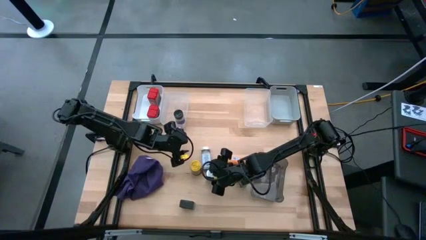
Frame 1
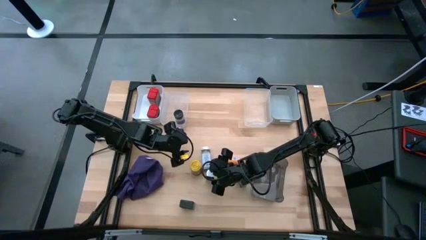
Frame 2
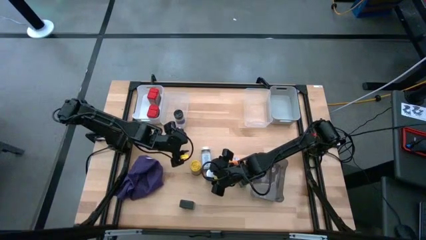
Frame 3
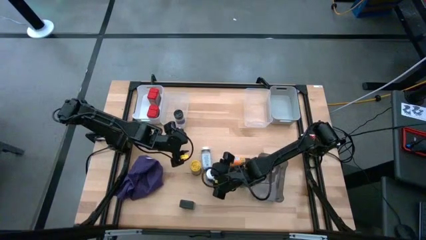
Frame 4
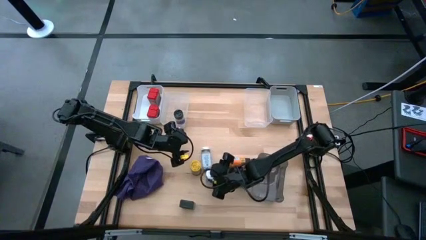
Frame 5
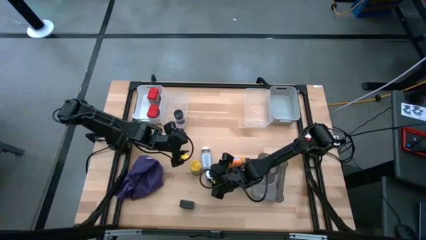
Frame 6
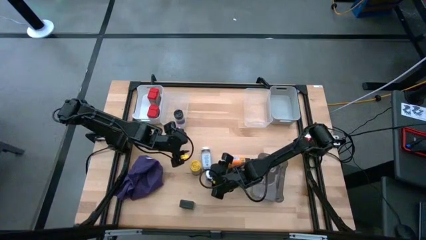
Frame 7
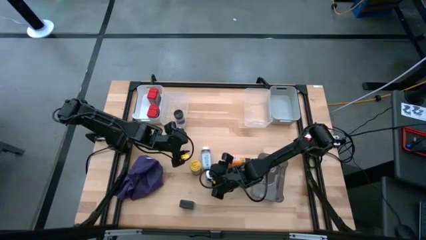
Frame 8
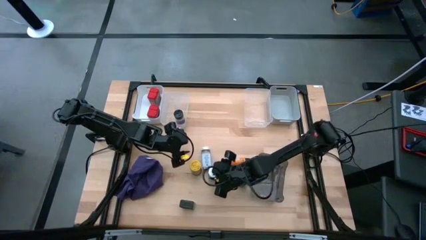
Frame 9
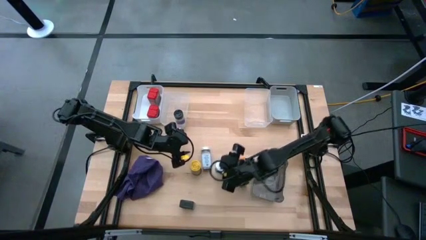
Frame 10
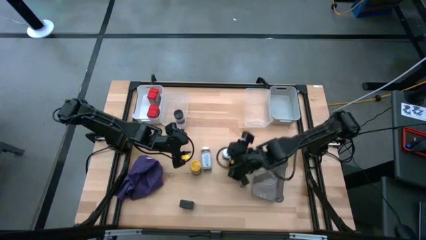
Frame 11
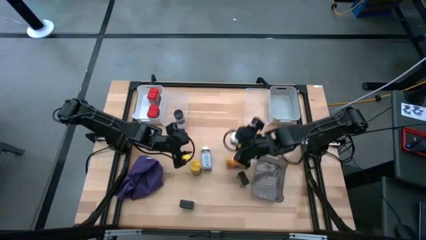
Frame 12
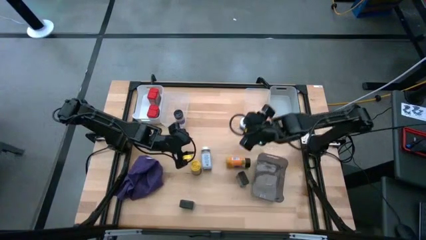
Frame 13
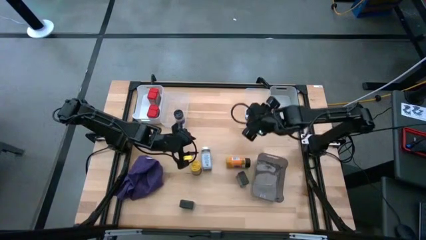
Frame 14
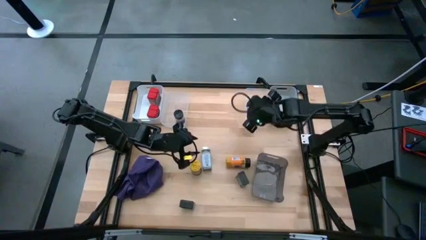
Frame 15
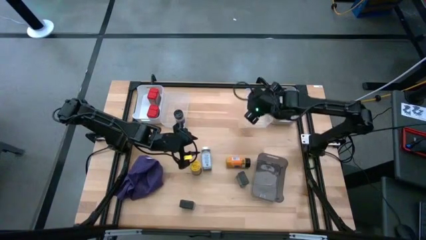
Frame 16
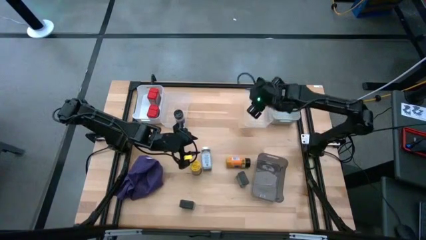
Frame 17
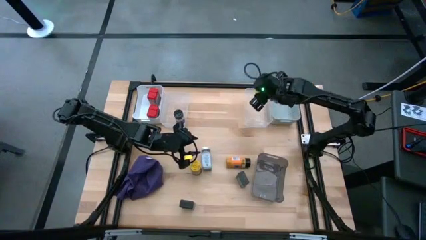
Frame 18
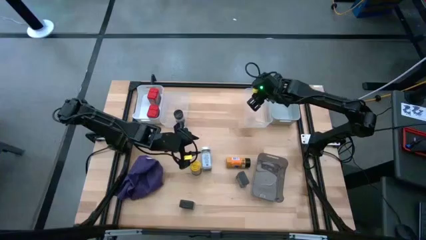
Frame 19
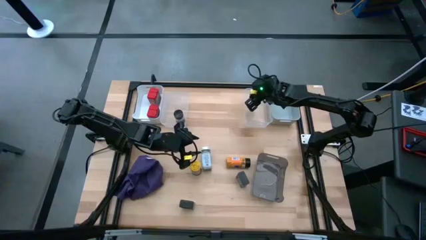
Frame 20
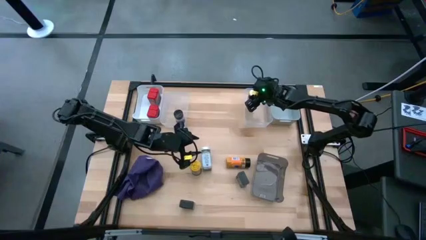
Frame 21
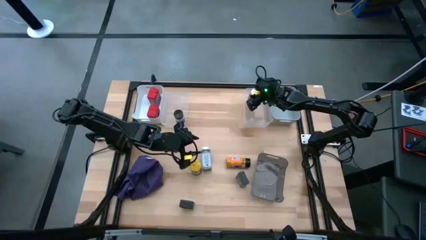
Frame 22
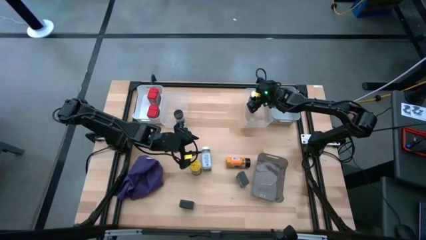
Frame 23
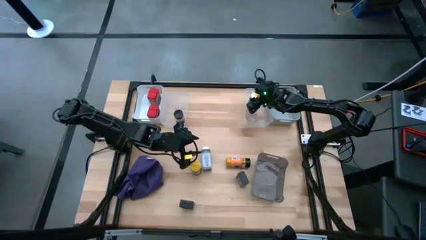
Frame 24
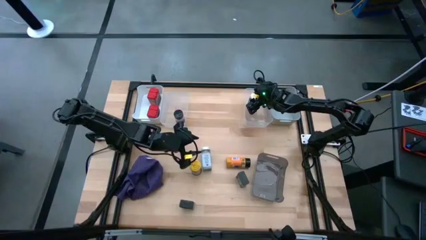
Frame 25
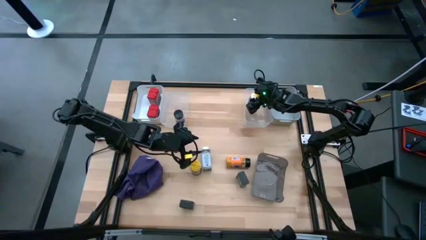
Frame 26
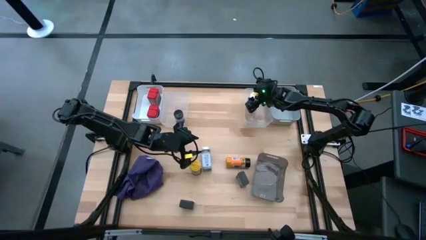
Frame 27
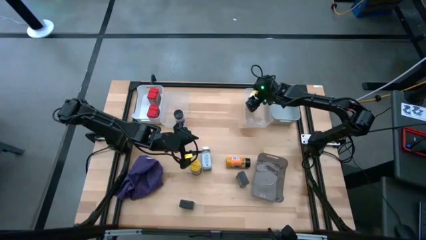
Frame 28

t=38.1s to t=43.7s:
Task: Sort spices by type
Put the bottom white seasoning bottle into the right transparent bin

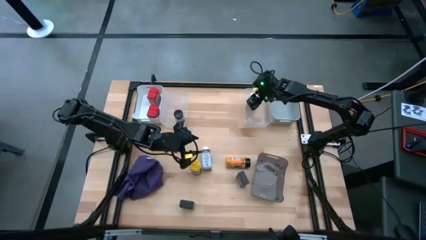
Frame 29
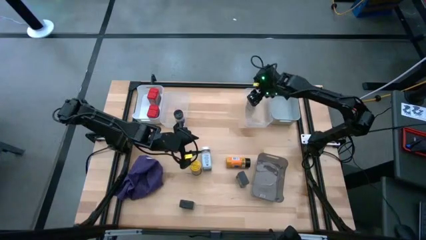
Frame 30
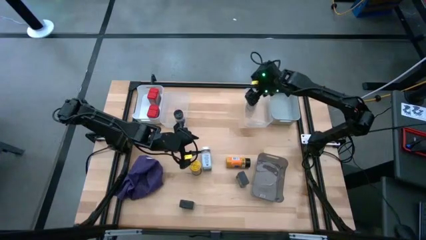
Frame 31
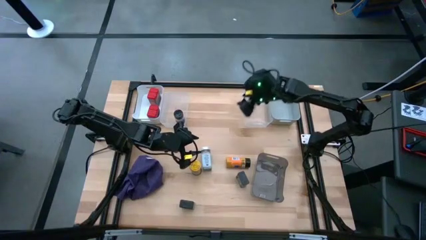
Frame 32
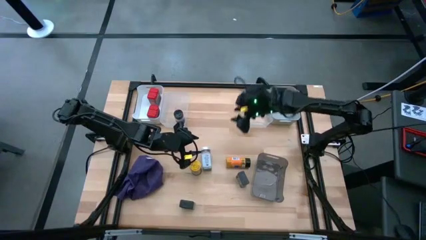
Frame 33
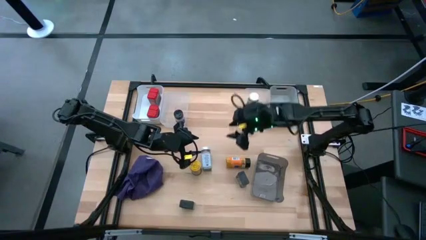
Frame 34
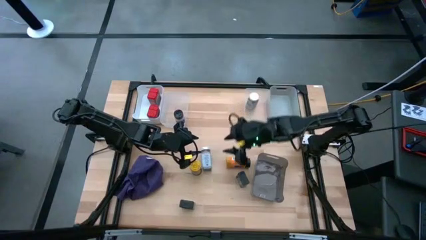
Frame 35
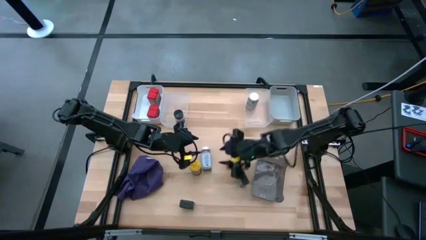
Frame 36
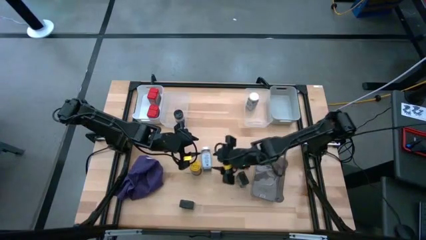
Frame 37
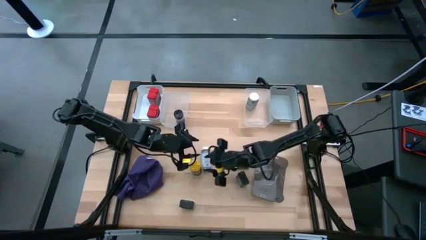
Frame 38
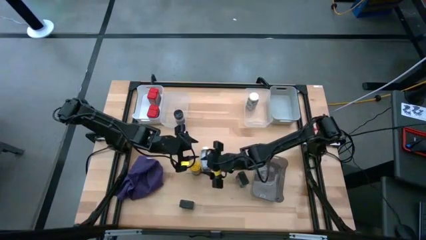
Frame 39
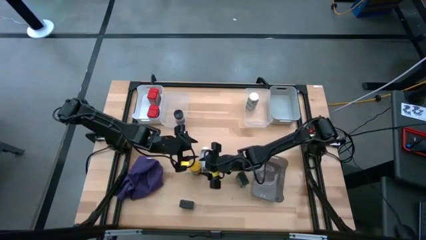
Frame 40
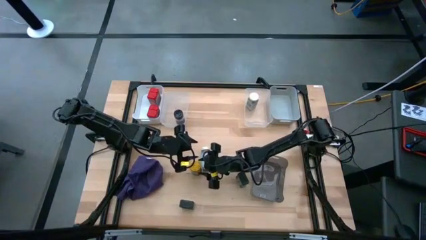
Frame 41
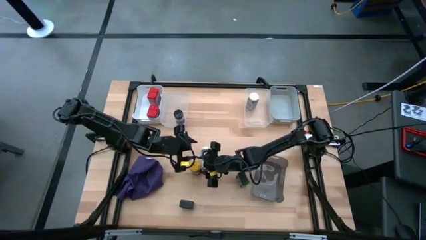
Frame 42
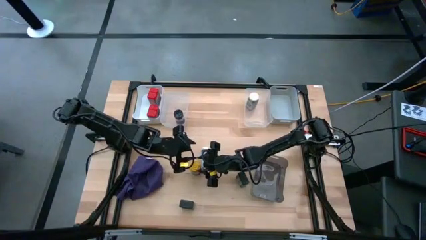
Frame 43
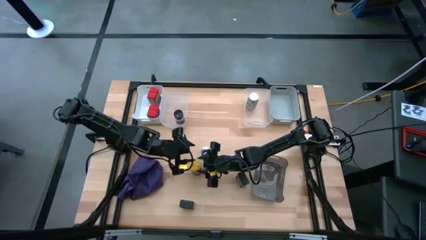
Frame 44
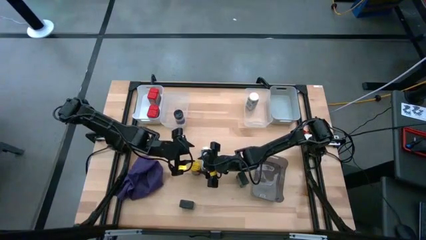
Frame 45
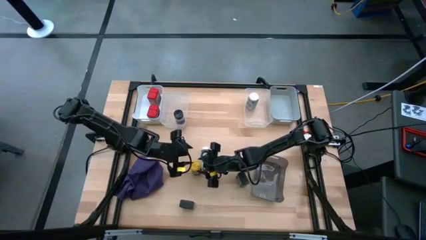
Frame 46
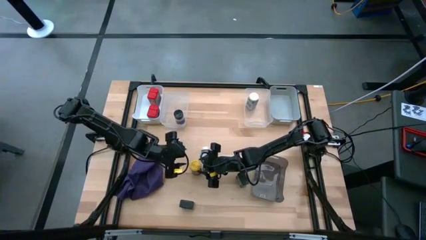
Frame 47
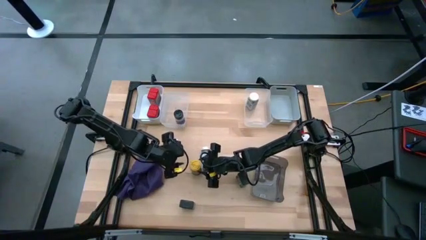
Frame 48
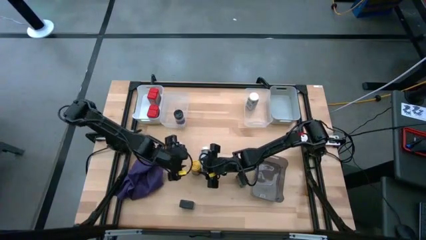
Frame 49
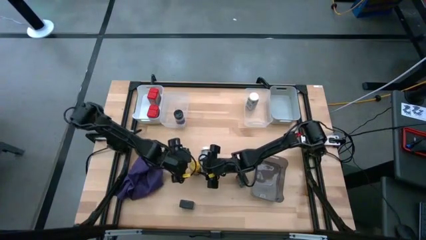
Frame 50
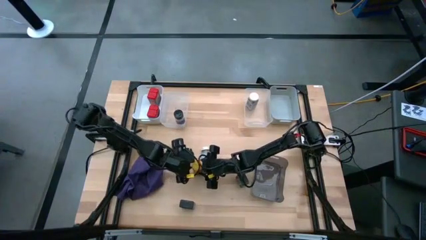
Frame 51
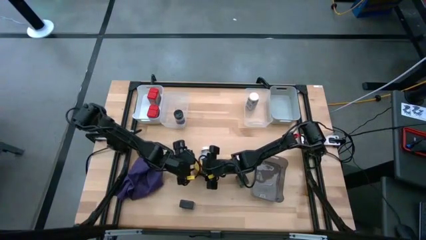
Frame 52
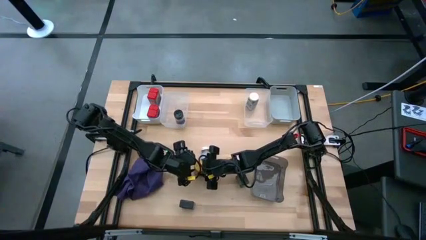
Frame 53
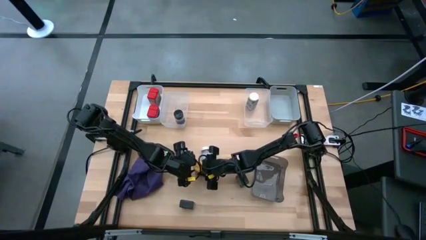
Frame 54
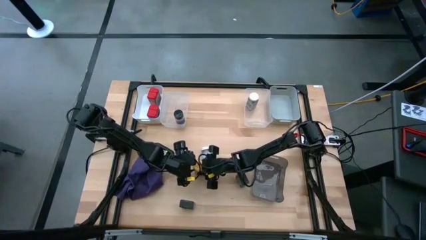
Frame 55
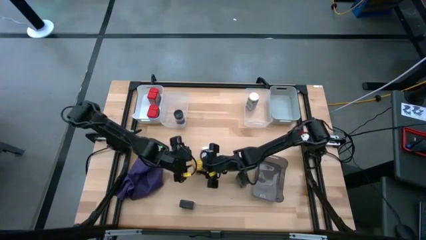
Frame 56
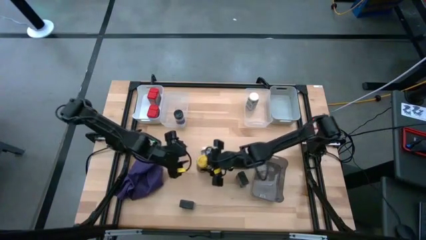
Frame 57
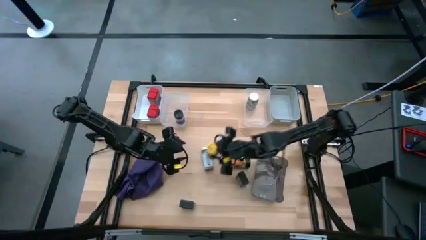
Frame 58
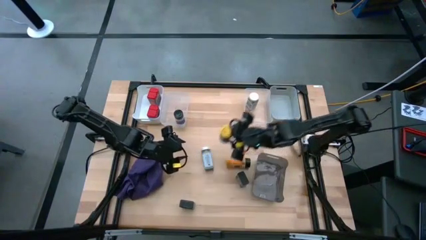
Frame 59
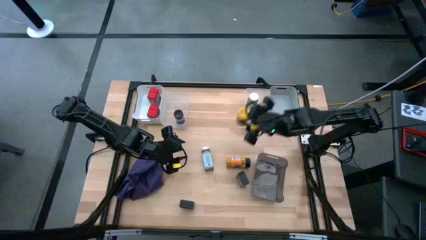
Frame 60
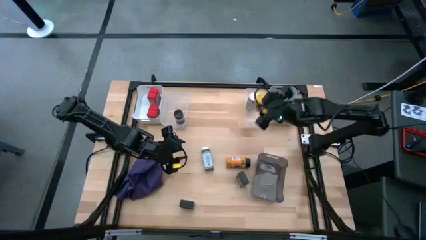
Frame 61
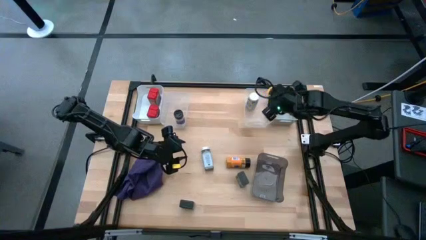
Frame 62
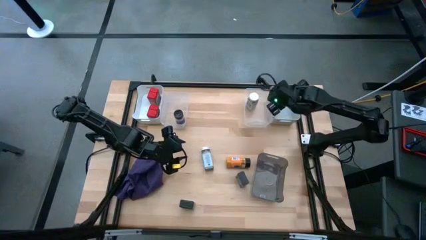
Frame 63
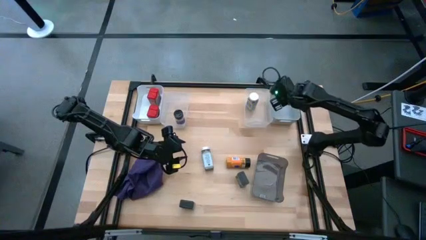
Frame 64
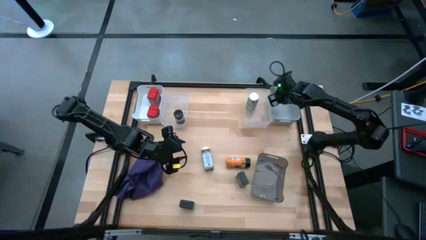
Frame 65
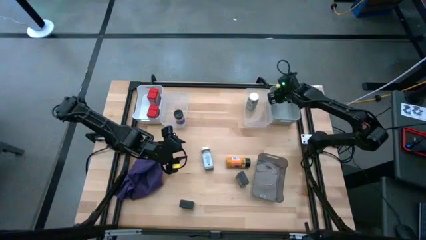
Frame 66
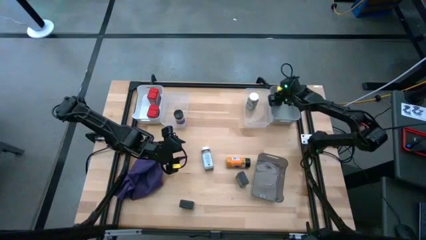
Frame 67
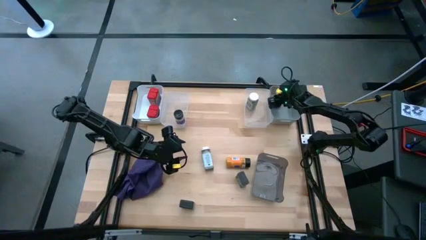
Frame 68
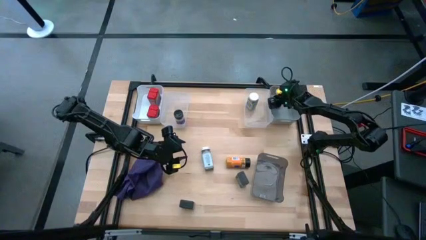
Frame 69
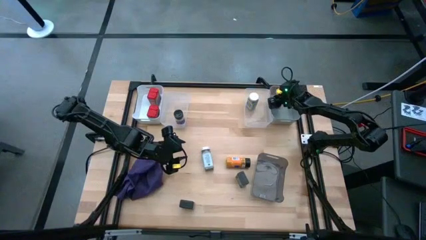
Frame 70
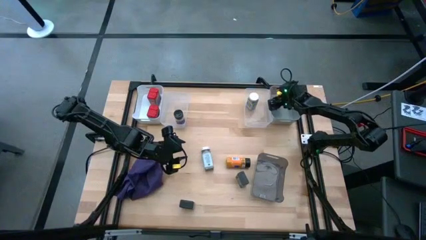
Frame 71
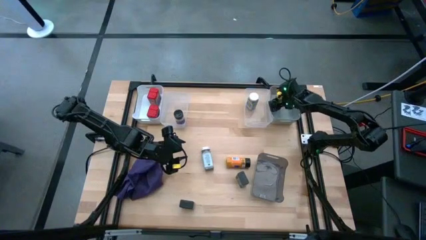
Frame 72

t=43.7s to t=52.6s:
Put the yellow seasoning bottle into the gray bin

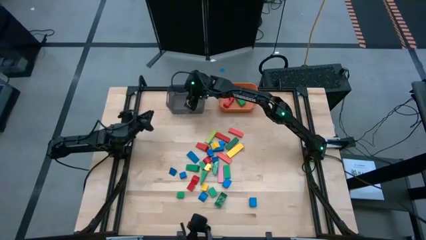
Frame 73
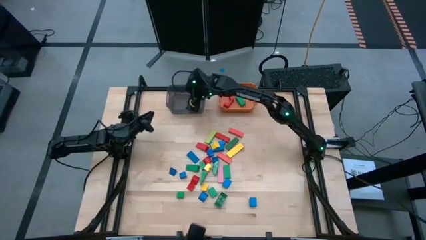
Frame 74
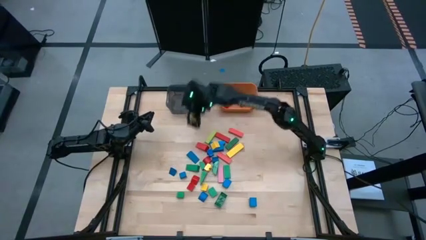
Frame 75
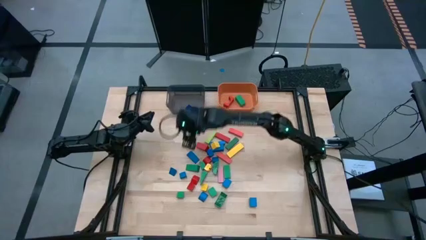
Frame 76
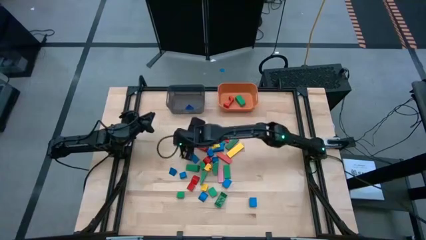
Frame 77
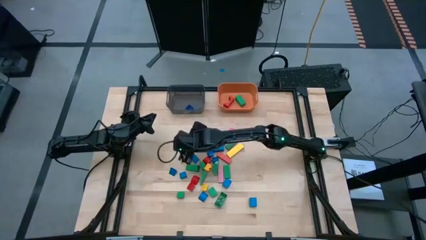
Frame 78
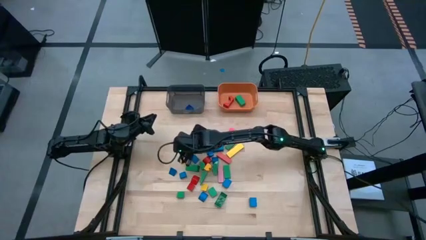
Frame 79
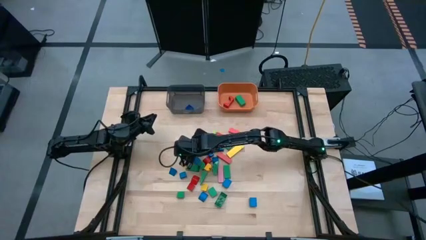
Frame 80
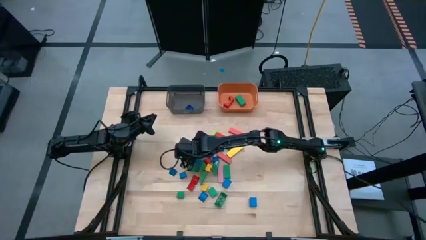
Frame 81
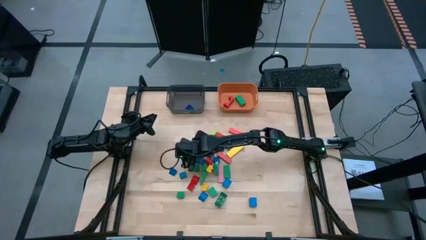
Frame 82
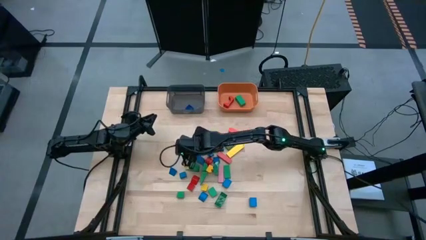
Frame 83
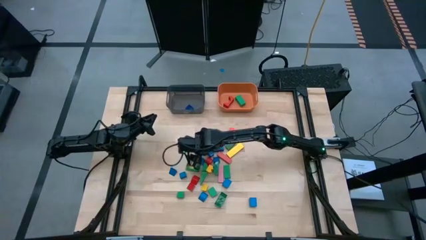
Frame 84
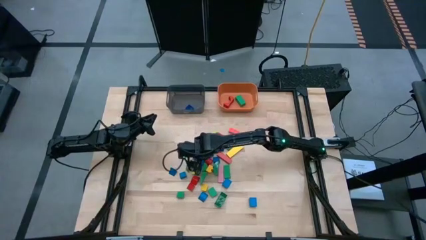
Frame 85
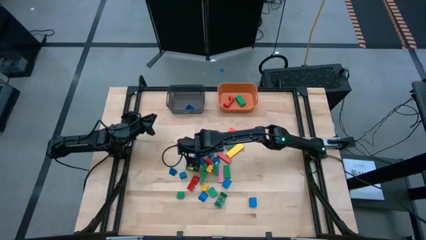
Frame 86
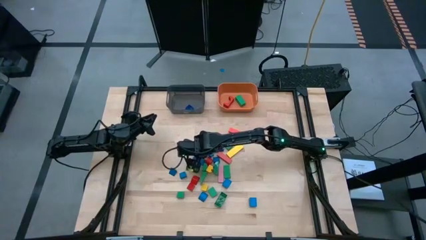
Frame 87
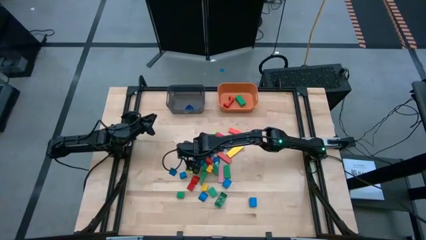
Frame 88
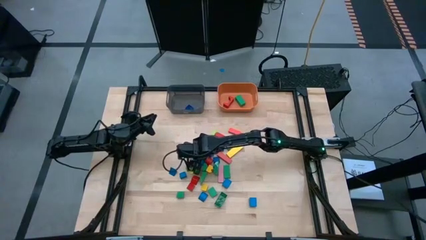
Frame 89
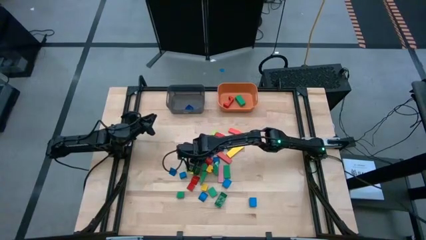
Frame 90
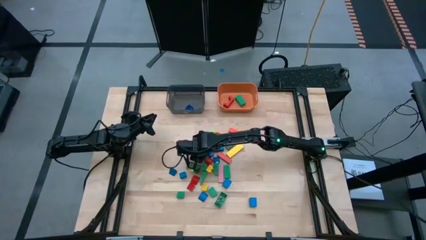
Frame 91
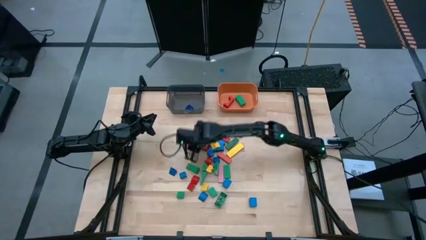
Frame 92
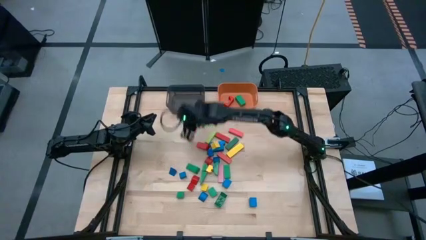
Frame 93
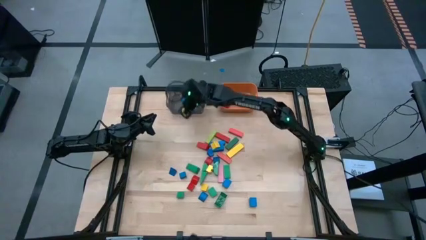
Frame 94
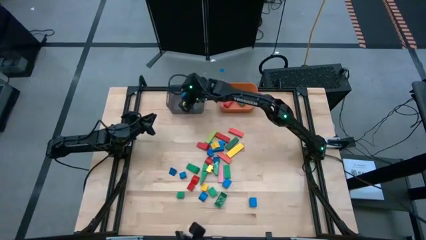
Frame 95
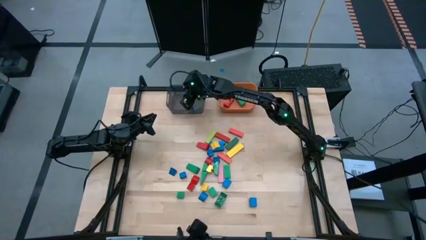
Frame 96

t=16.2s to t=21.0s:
Task: Sort blocks by size
Put the small blue block into the black bin
